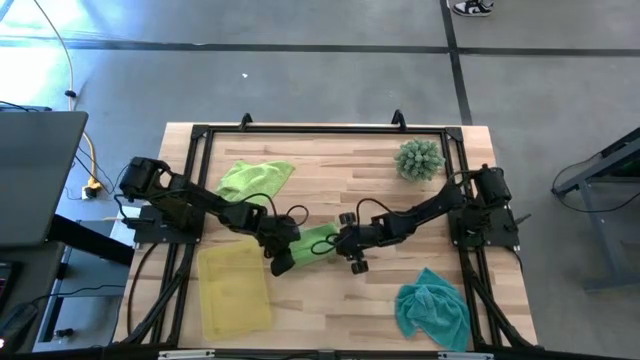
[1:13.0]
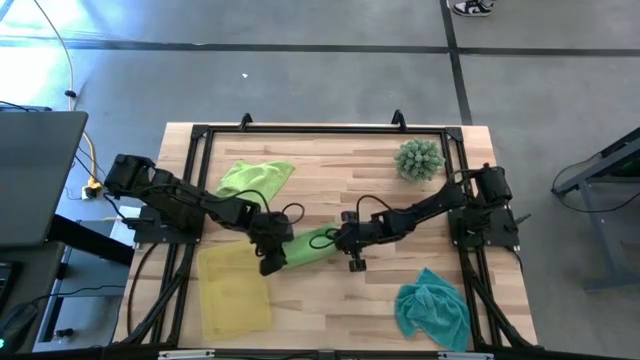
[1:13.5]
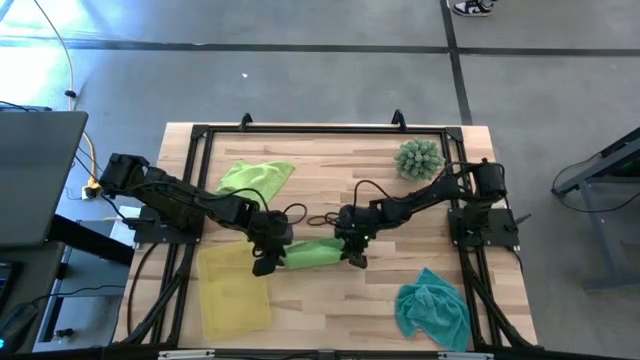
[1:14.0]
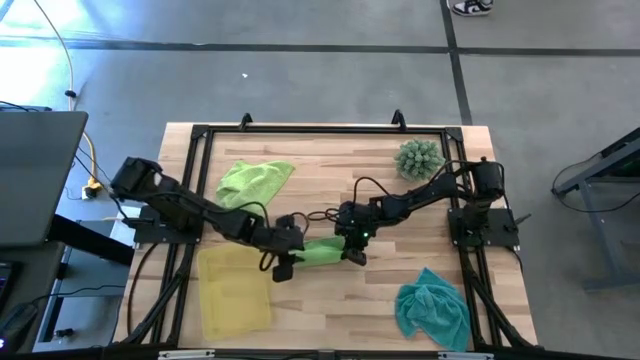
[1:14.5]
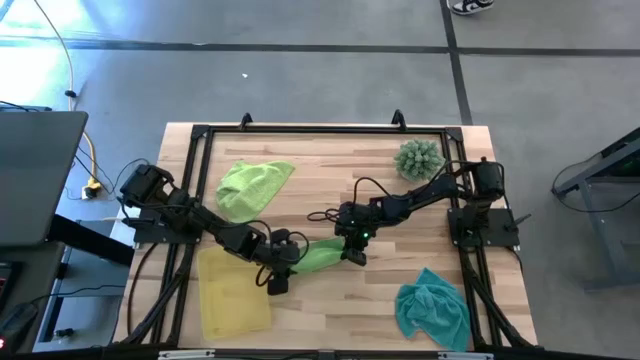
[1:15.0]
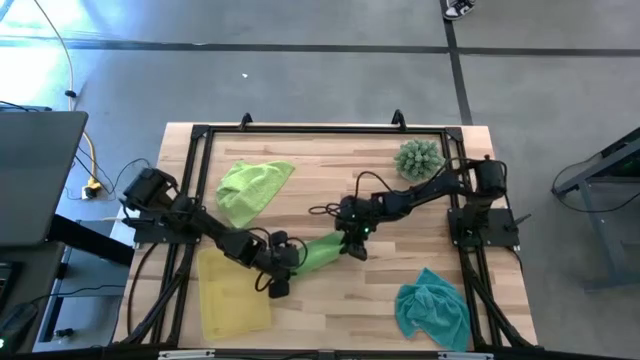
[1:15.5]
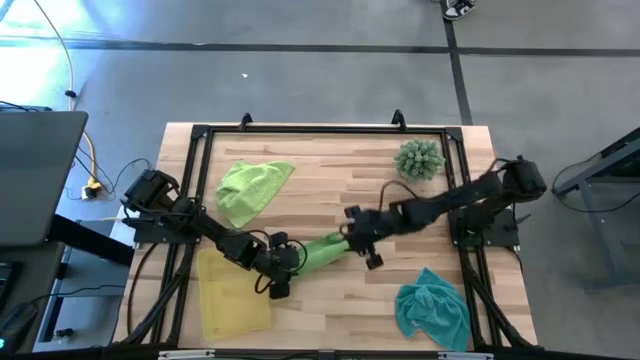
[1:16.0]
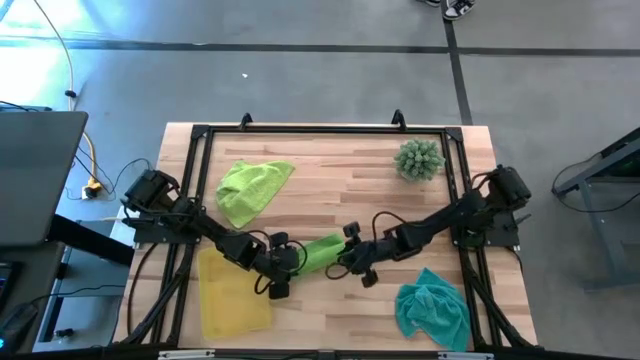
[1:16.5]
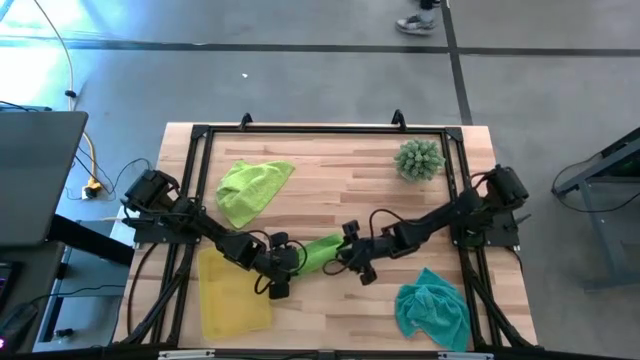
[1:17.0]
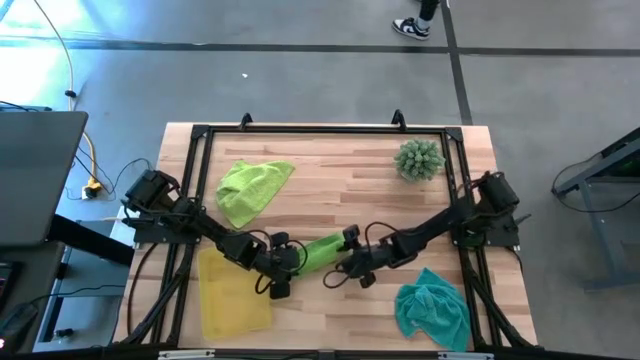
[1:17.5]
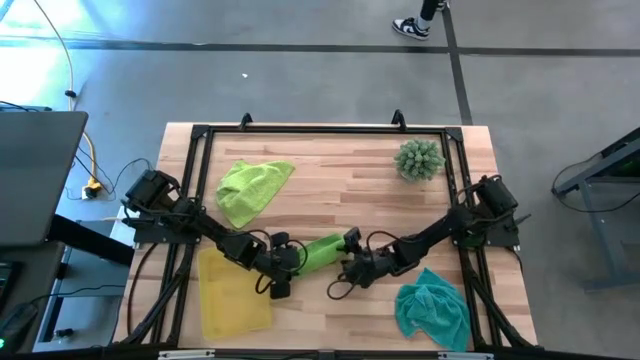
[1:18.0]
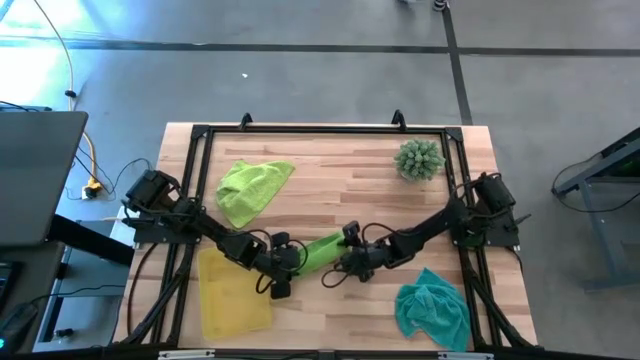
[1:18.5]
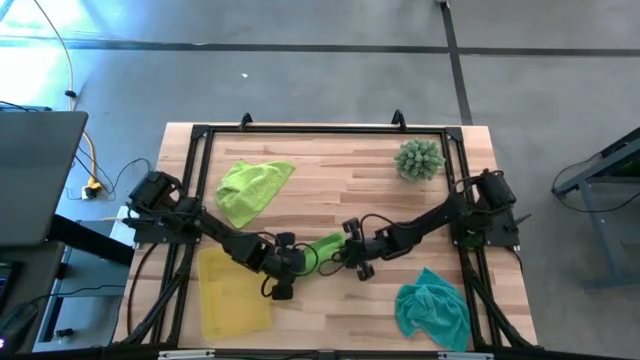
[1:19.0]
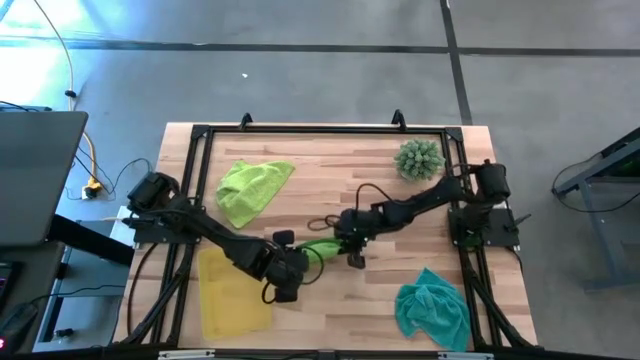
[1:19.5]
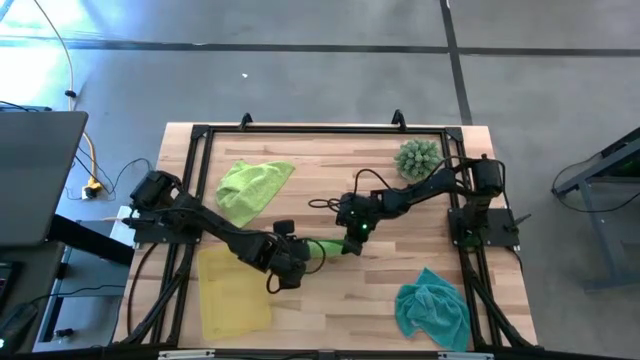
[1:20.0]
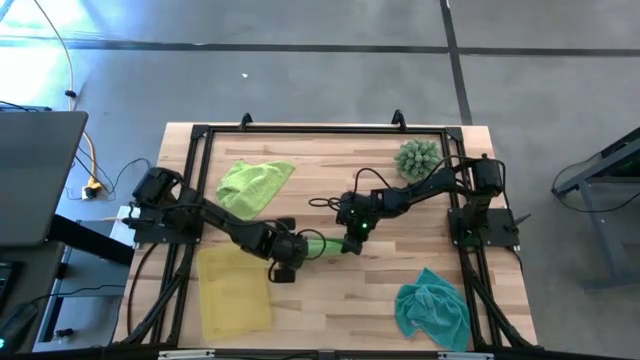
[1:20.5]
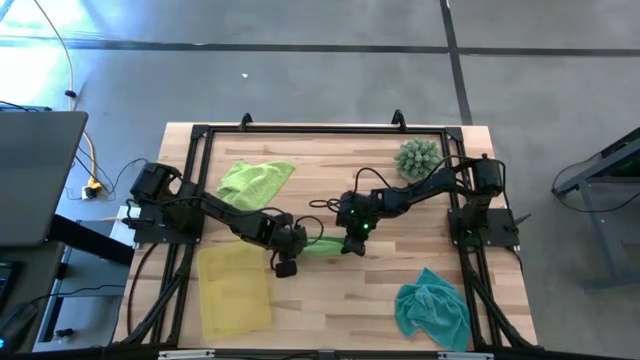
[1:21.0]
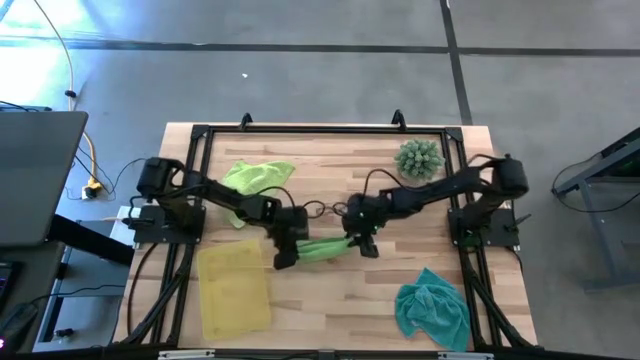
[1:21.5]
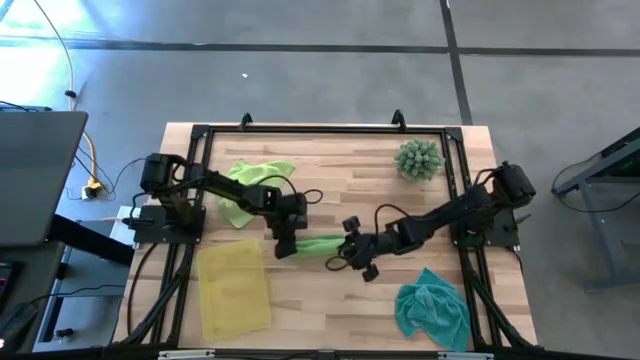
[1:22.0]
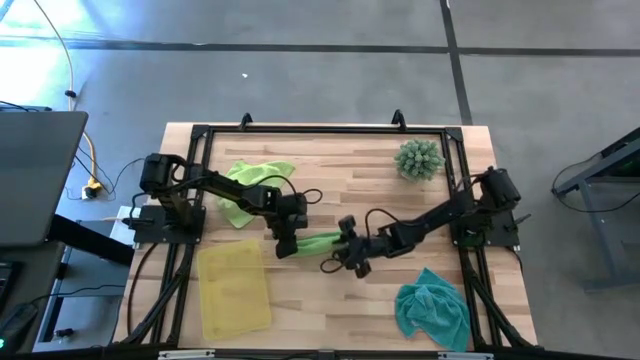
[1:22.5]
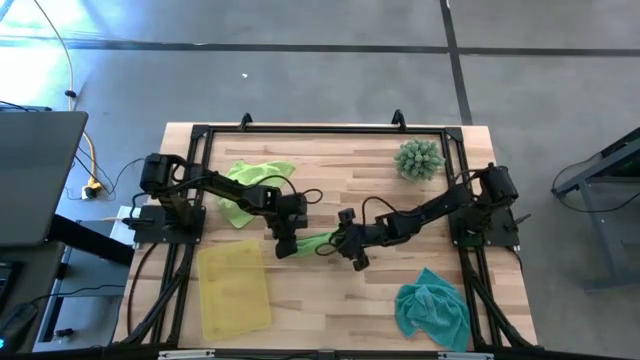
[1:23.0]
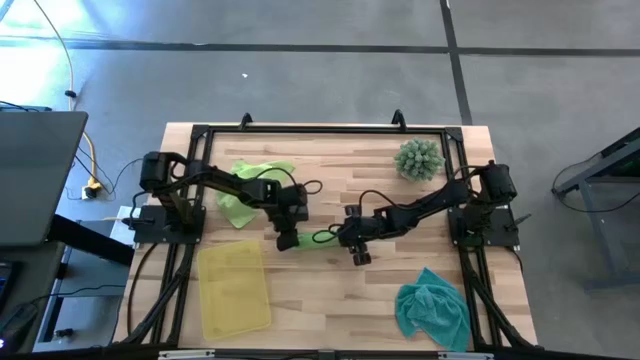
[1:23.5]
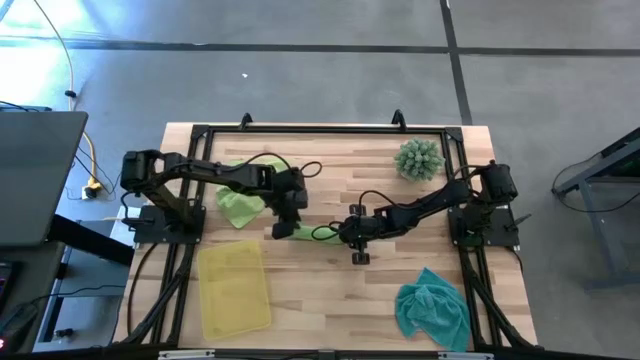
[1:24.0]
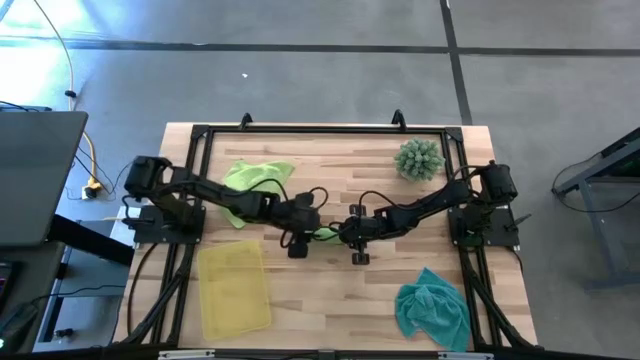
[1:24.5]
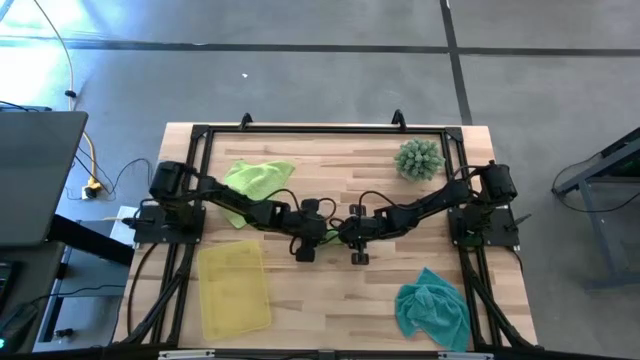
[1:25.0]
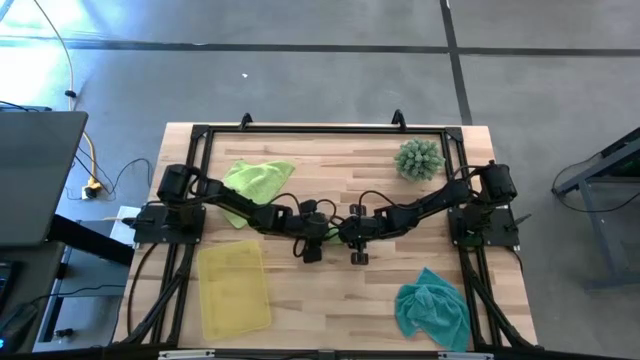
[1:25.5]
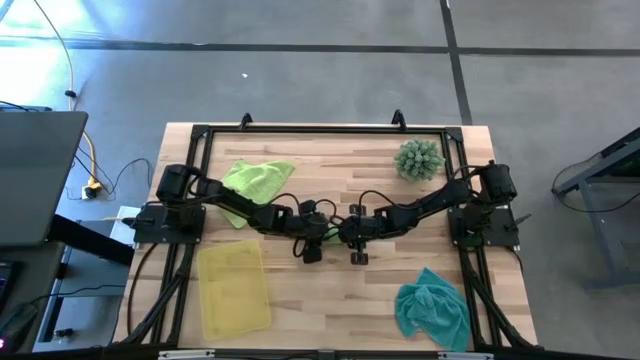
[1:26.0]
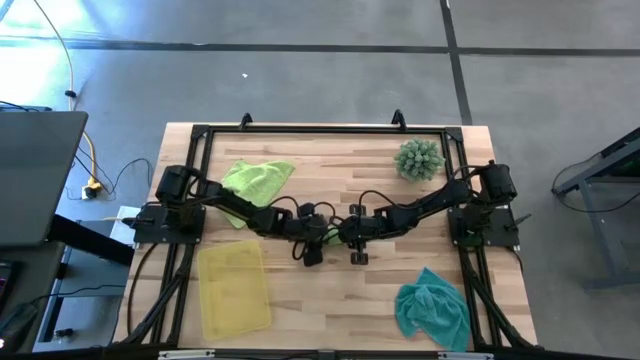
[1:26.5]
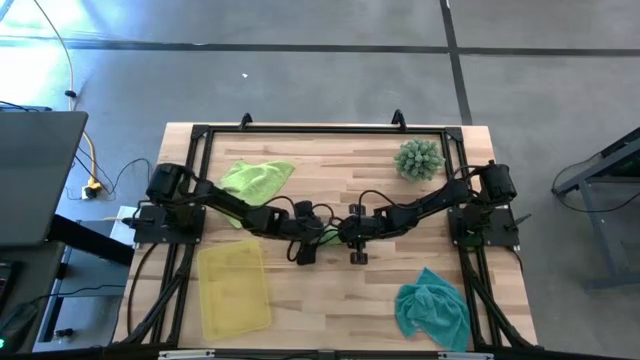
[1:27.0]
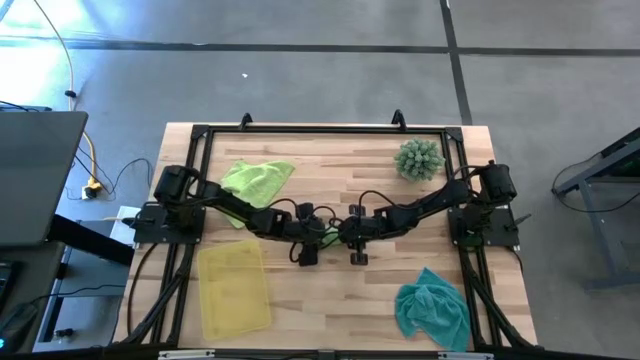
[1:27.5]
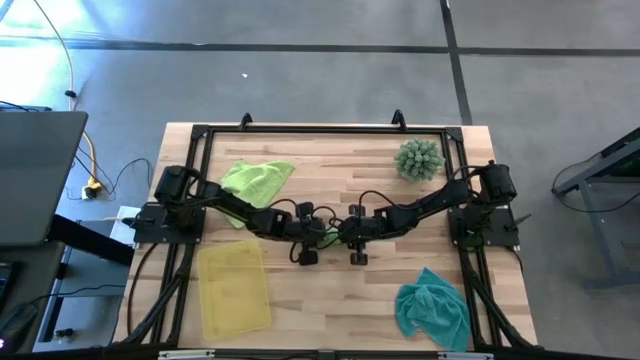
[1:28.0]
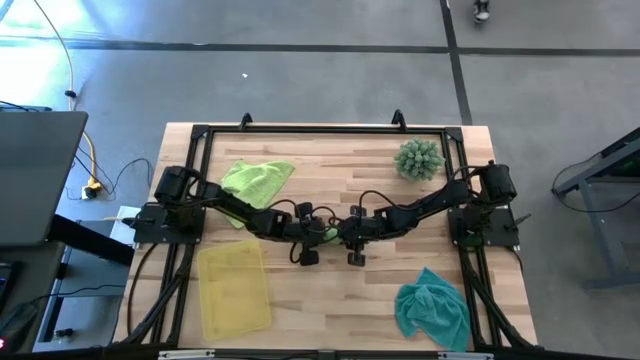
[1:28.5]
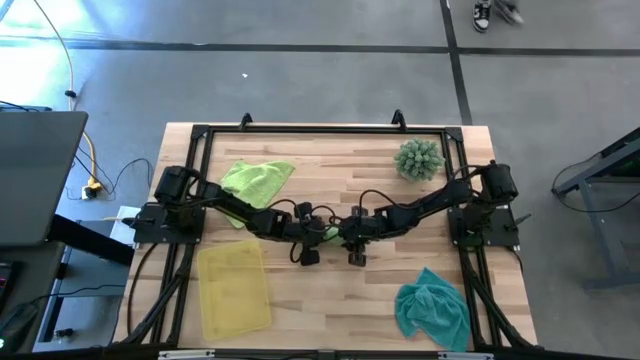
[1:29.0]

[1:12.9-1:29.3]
Task: Roll microfiber towels into tight, uniform cylinder then place into a basket
Roll the green microfiber towel

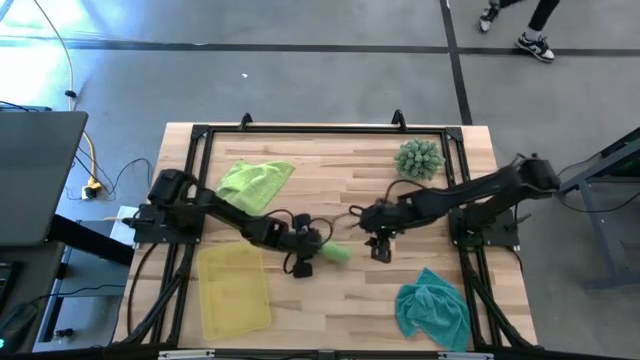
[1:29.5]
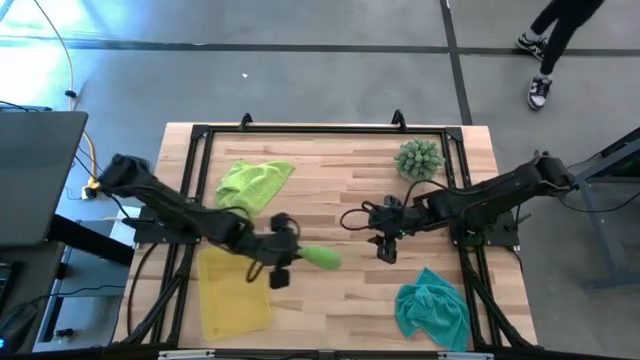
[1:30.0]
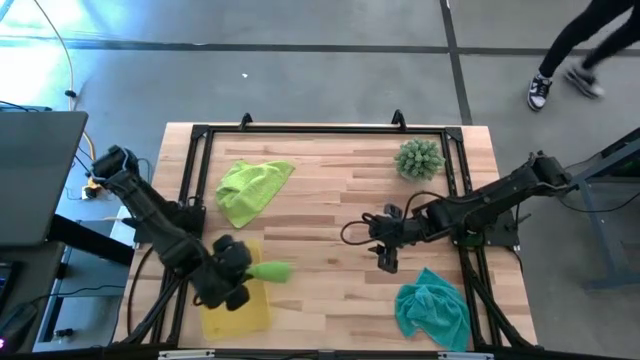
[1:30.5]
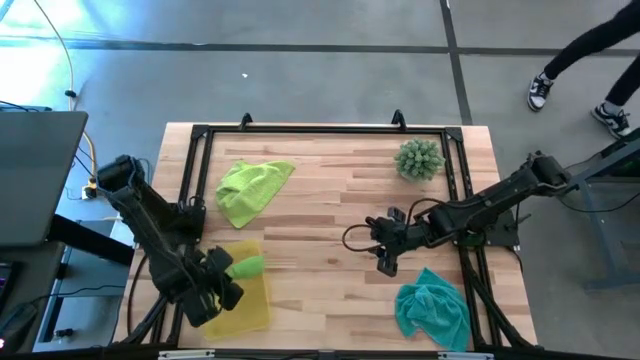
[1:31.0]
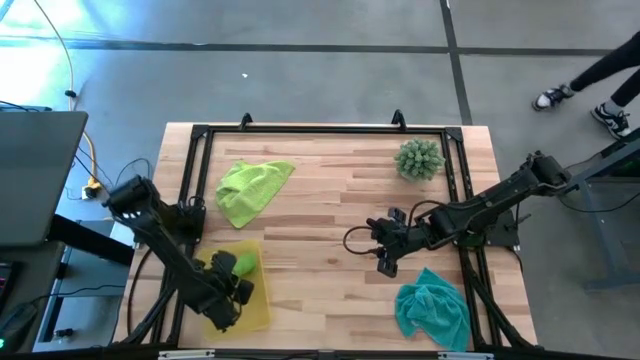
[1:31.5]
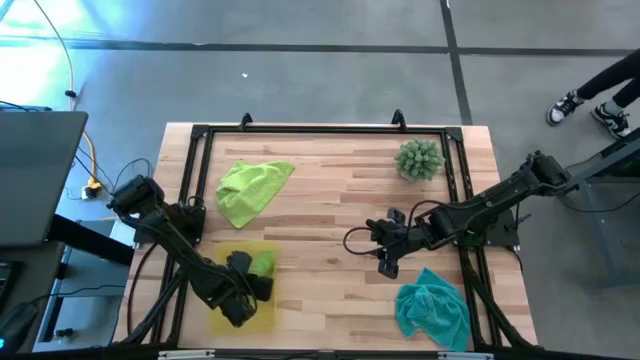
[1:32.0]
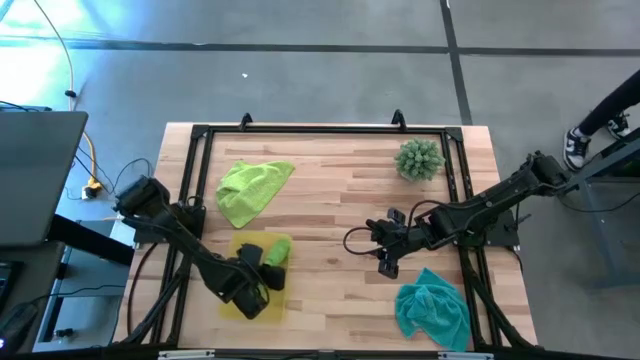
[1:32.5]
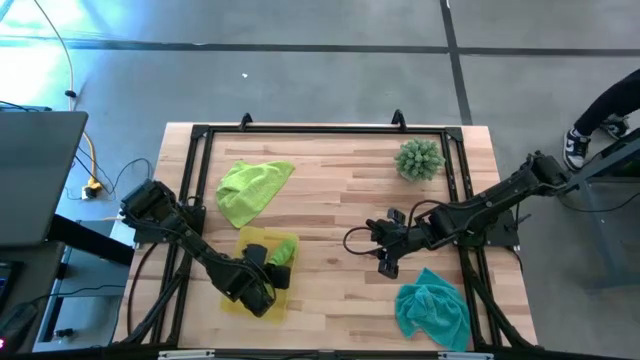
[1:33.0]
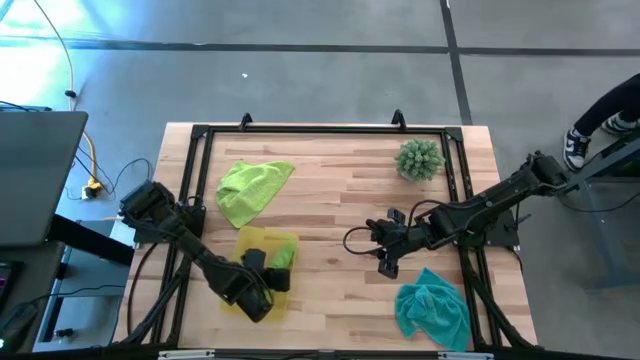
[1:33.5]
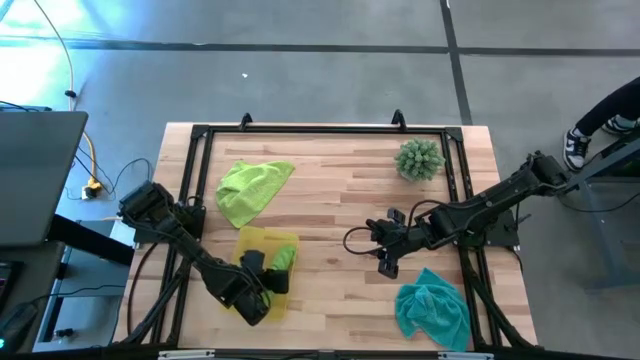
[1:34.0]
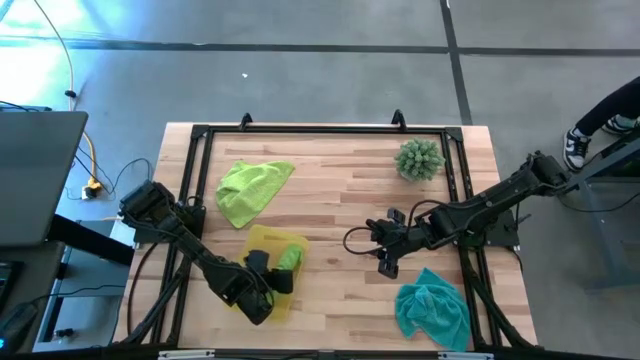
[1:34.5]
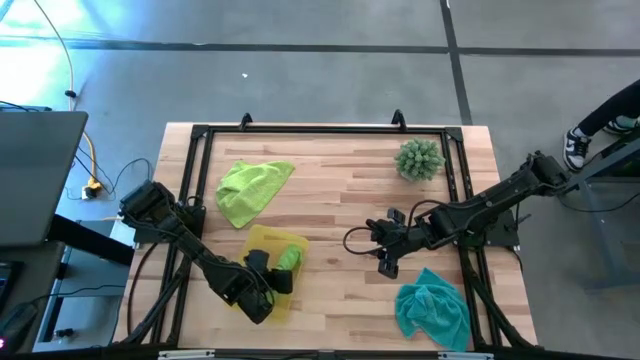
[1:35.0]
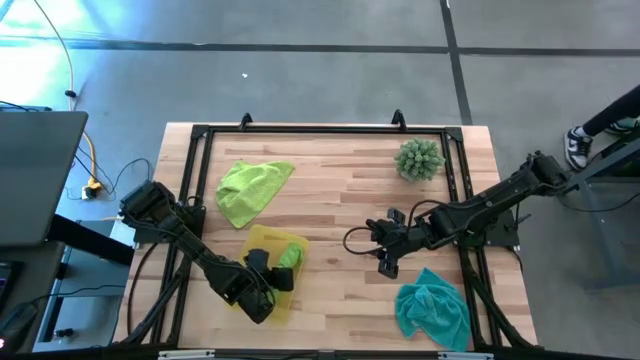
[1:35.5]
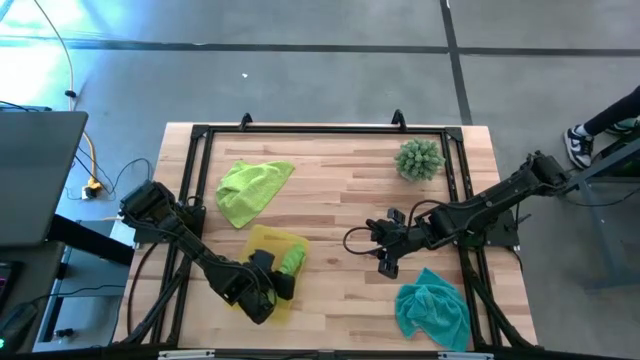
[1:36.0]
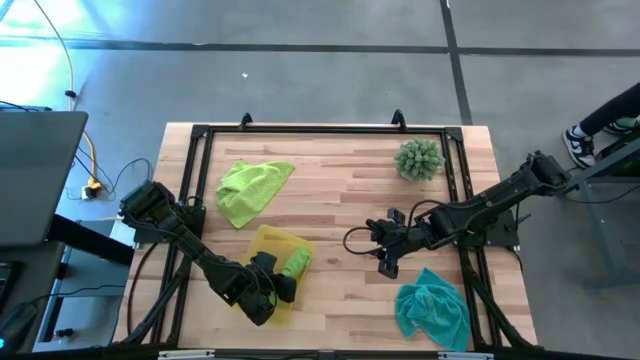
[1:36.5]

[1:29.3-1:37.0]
Put the green microfiber towel into the yellow bin
